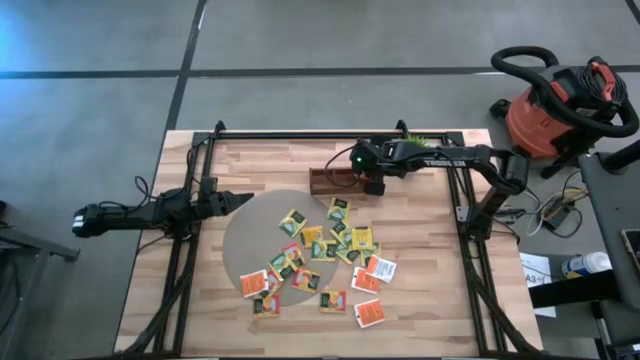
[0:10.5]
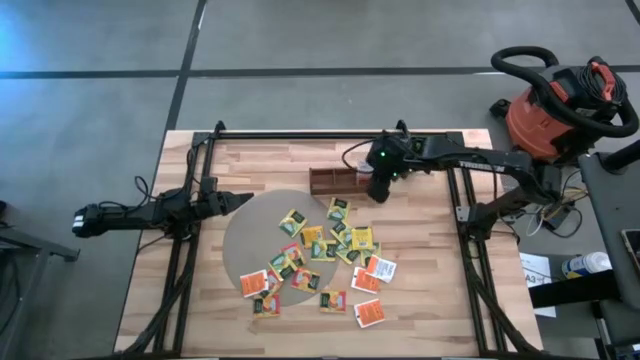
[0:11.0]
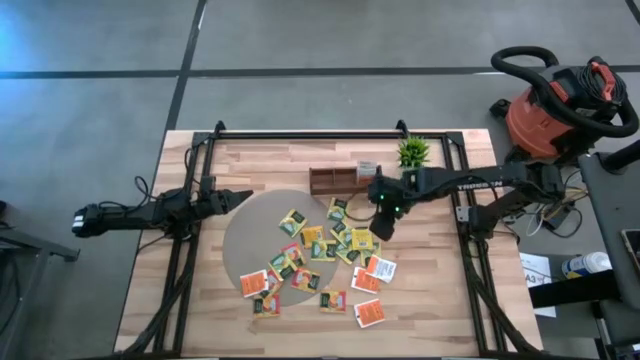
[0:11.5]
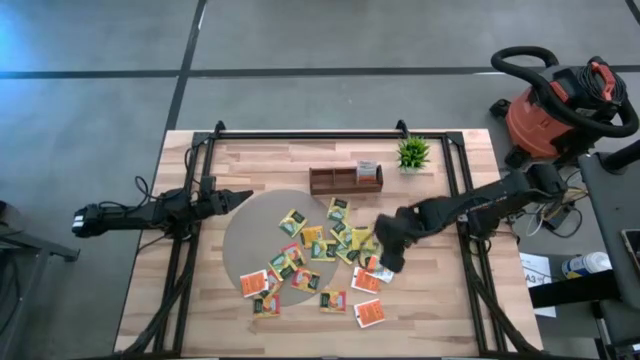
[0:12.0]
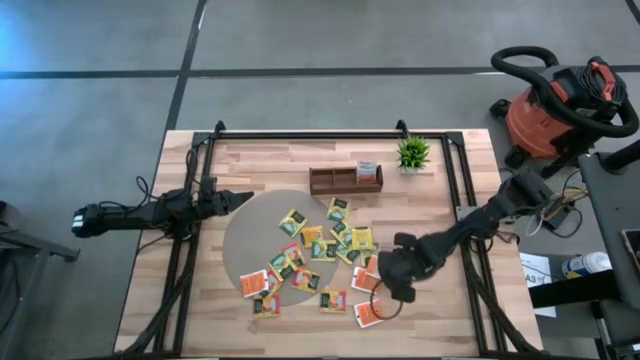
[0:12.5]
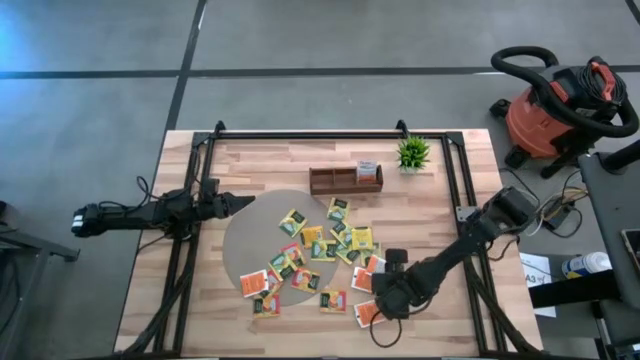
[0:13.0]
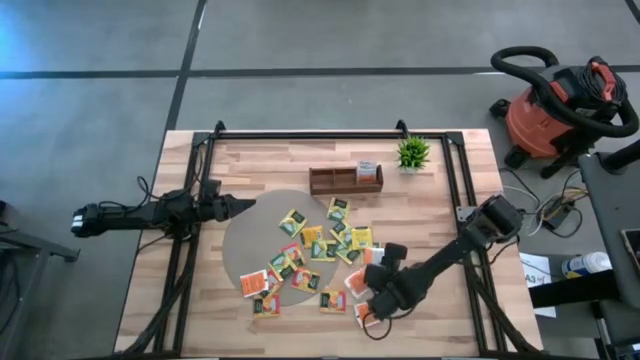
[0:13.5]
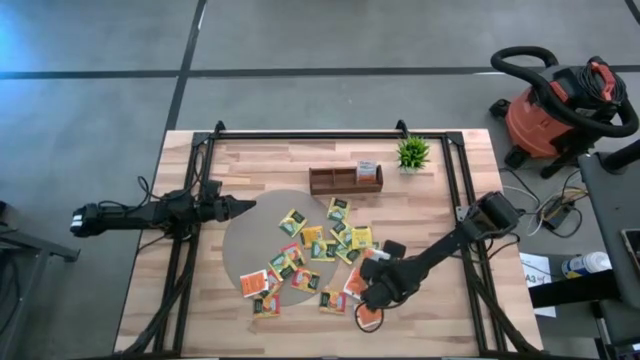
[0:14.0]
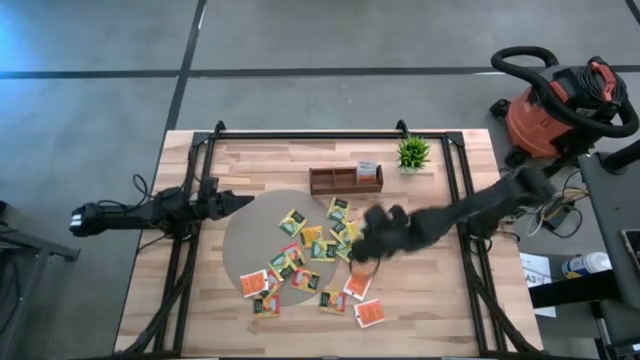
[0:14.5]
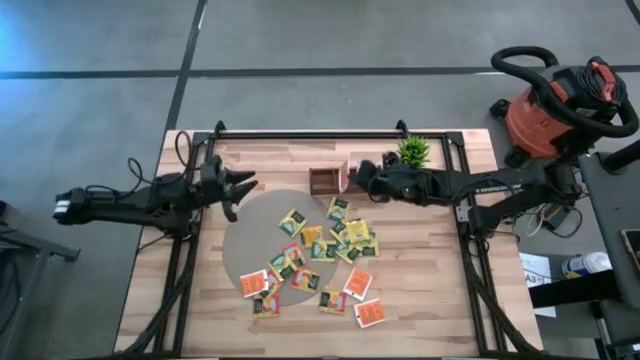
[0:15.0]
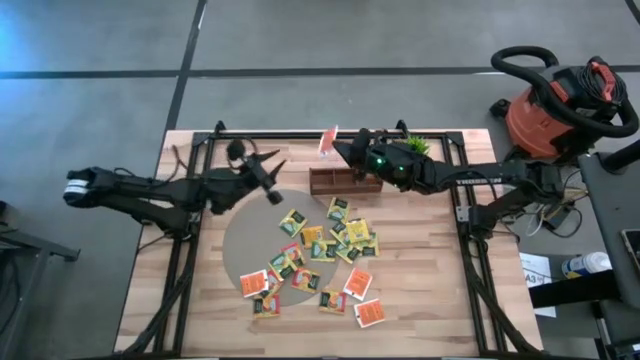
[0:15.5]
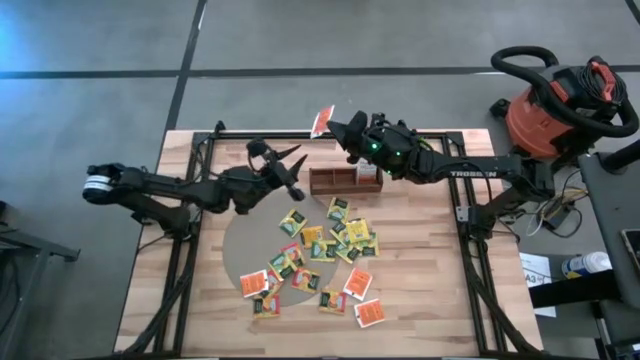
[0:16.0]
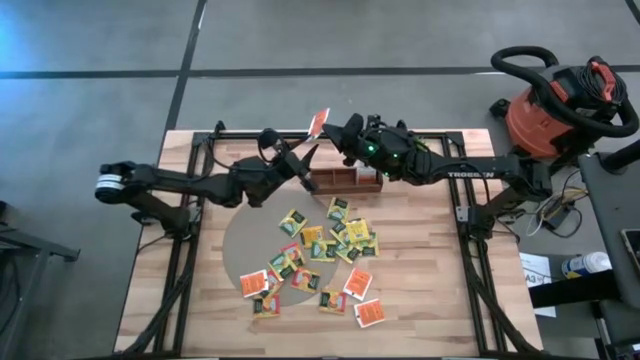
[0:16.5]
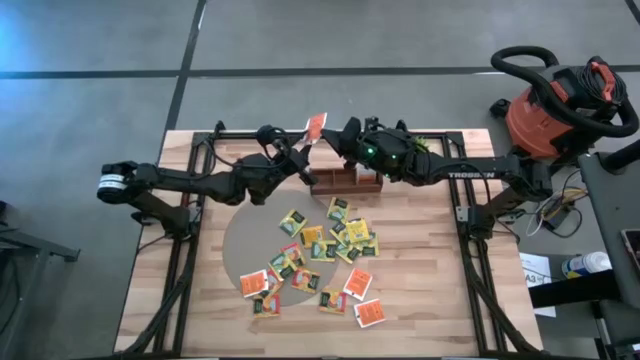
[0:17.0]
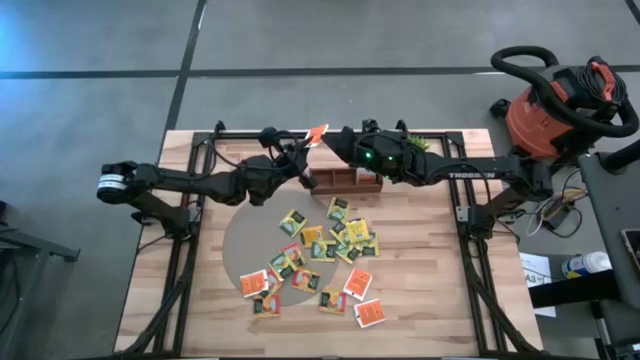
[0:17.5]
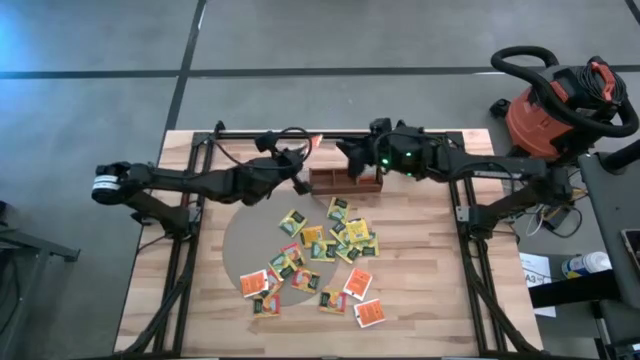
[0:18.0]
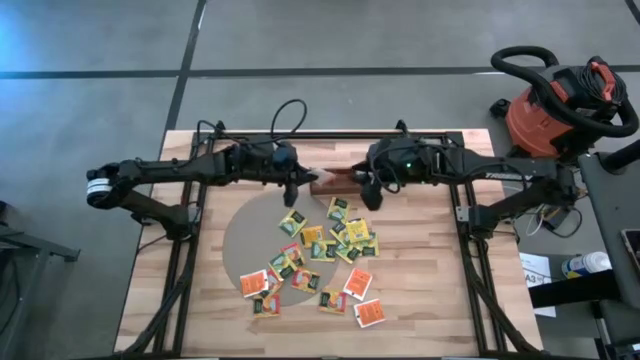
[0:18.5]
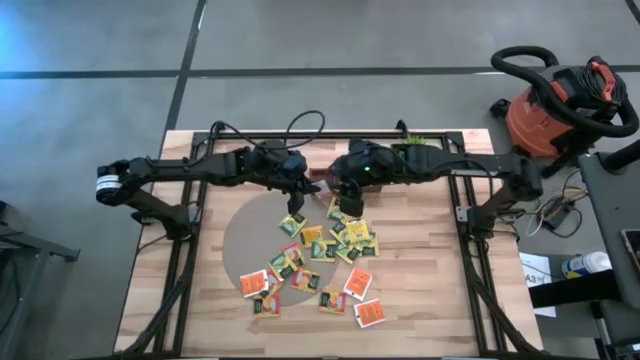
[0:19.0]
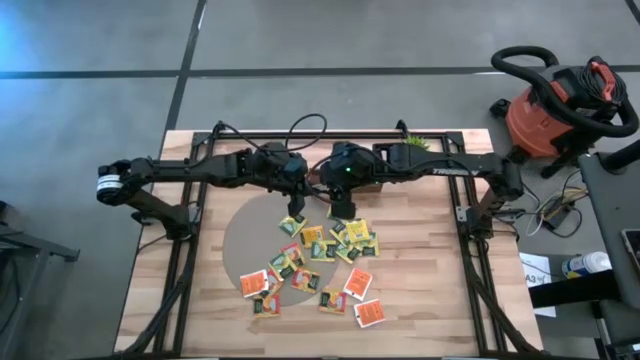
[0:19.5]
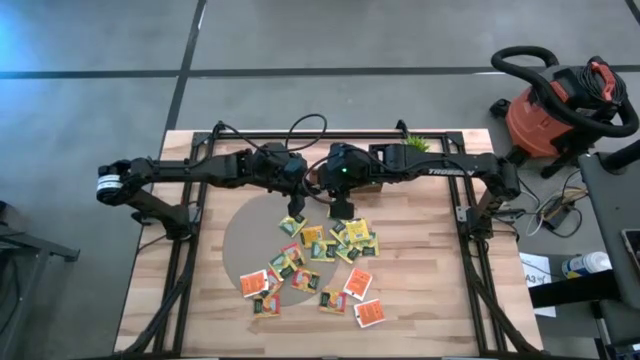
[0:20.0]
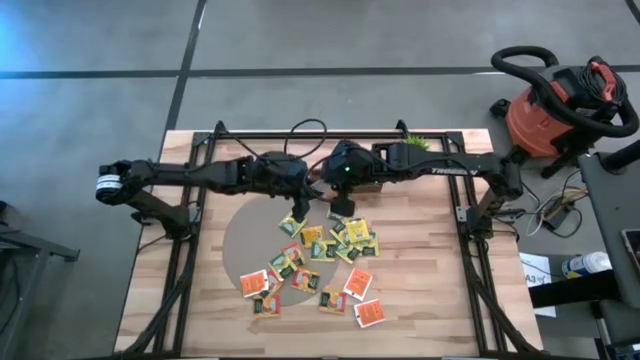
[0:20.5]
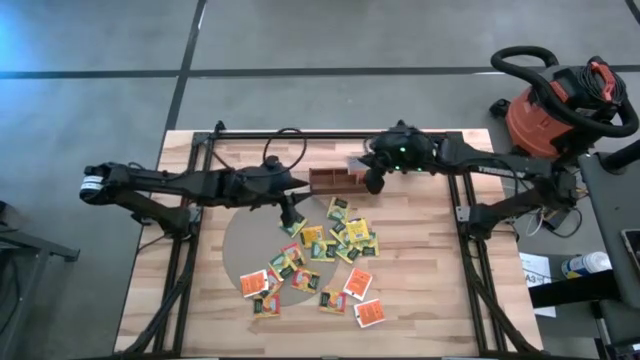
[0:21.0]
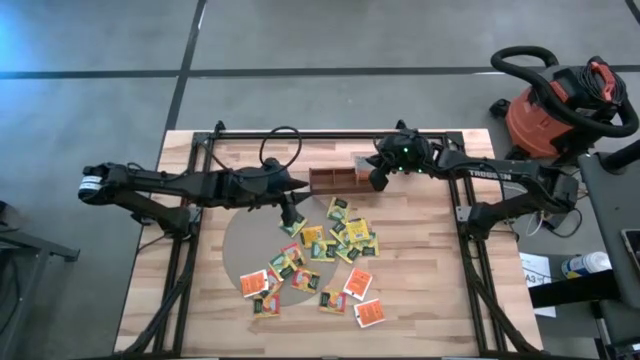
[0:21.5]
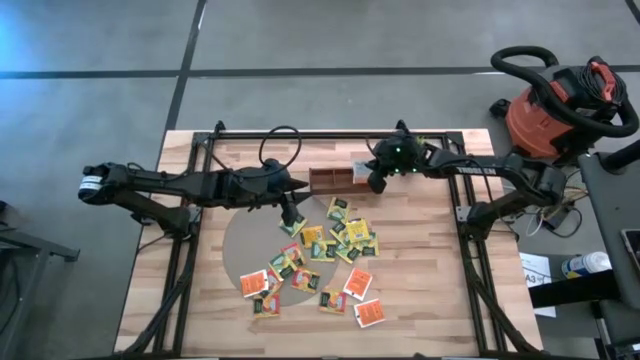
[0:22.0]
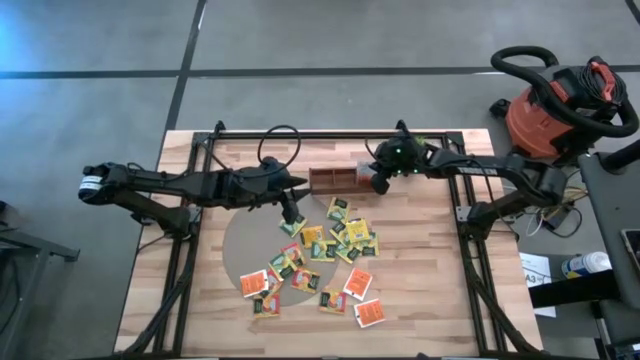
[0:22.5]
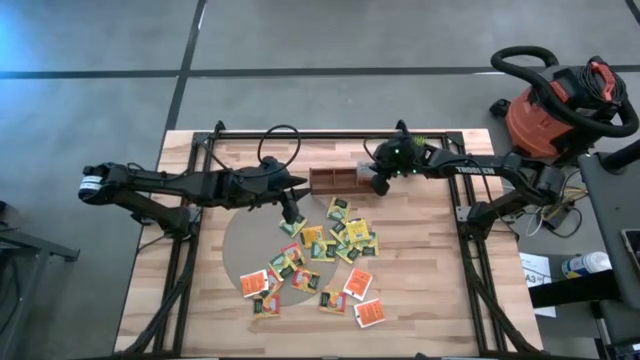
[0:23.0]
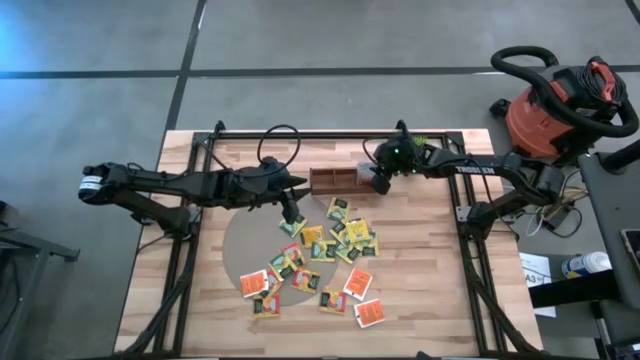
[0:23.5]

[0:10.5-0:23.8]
Task: Pick & Place Tea
Put the orange tea sachet into the right compartment of the wooden organizer

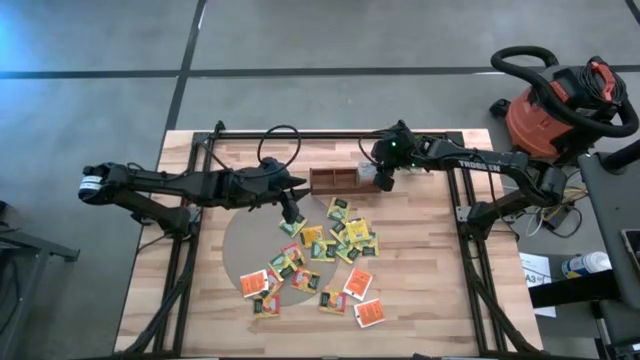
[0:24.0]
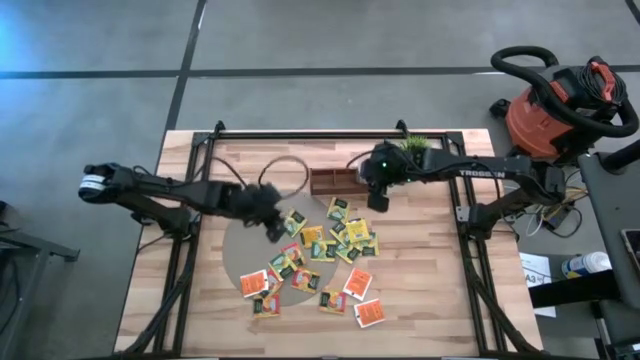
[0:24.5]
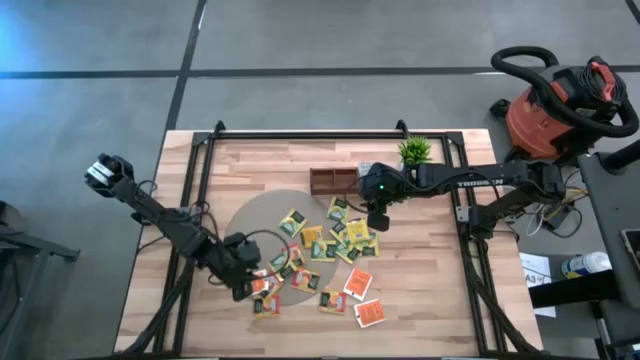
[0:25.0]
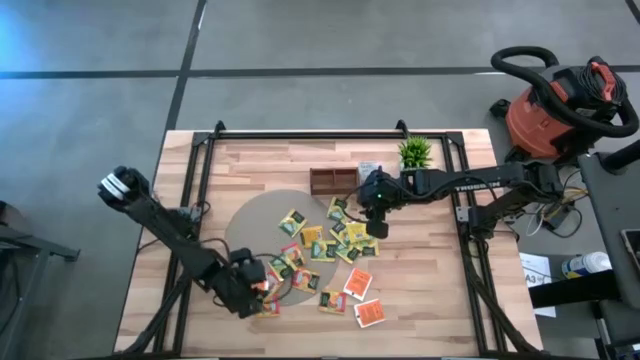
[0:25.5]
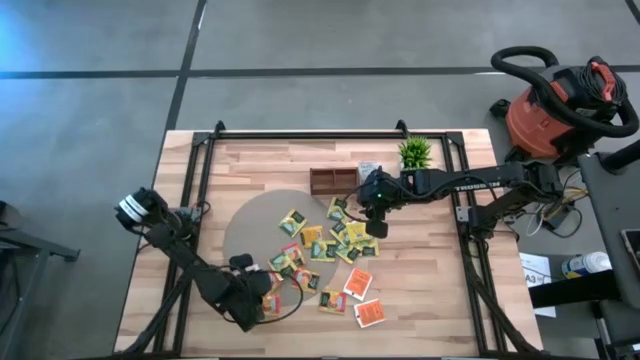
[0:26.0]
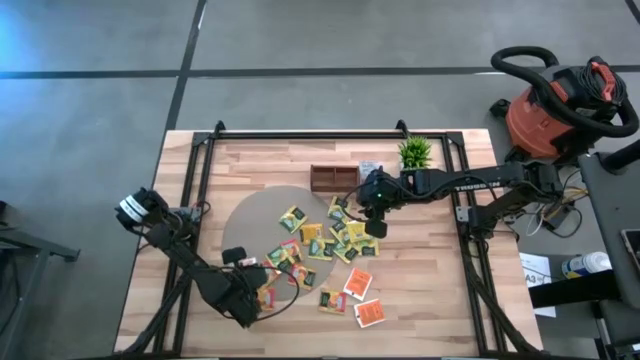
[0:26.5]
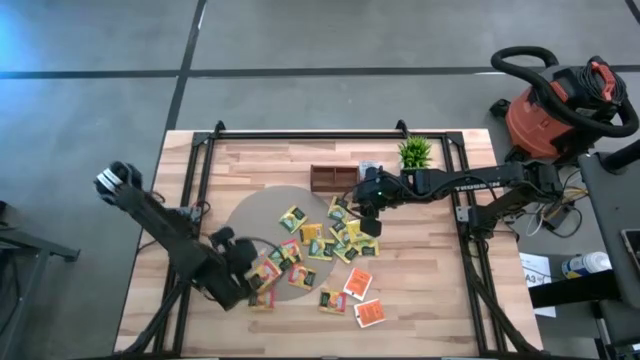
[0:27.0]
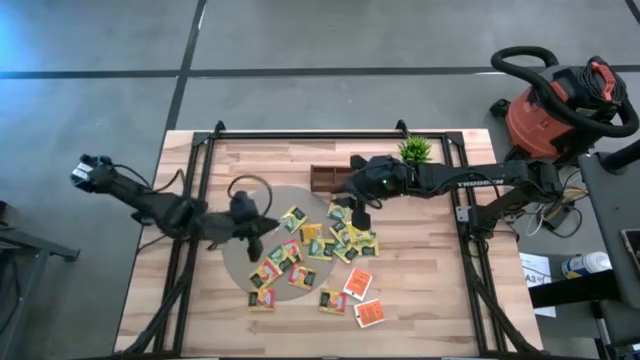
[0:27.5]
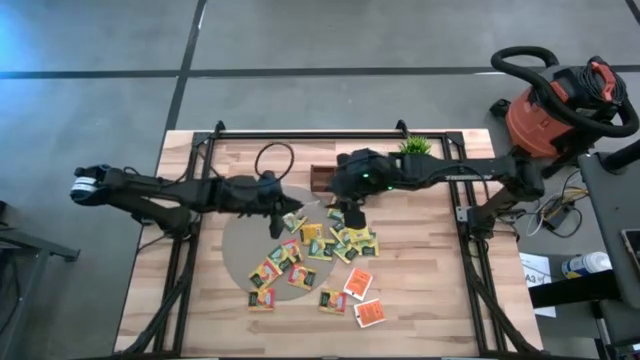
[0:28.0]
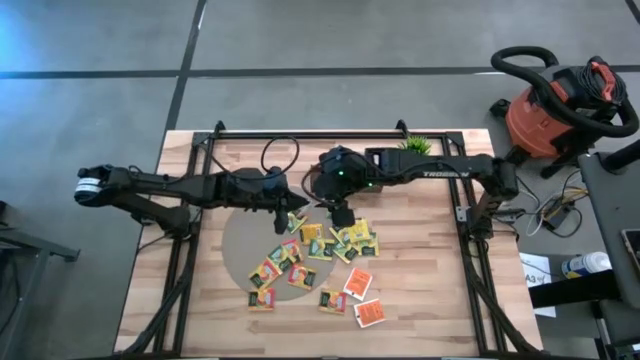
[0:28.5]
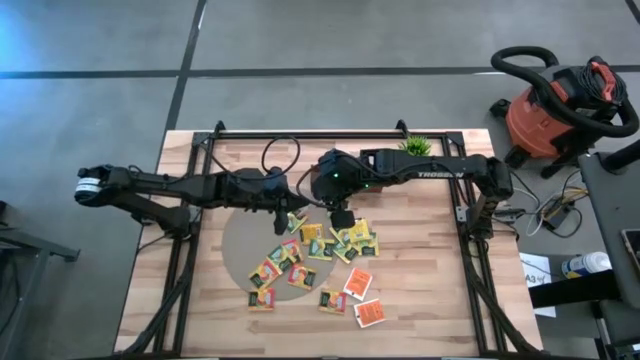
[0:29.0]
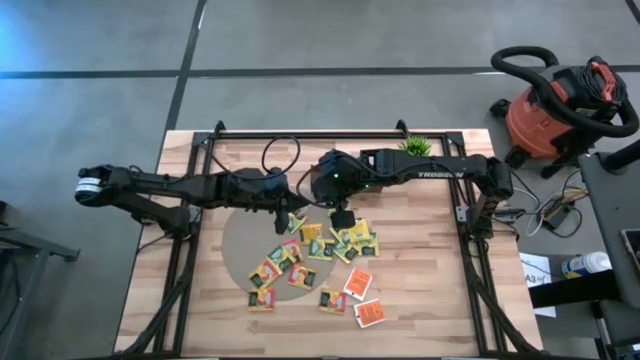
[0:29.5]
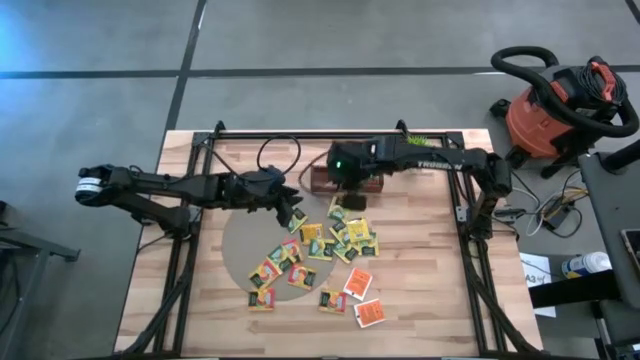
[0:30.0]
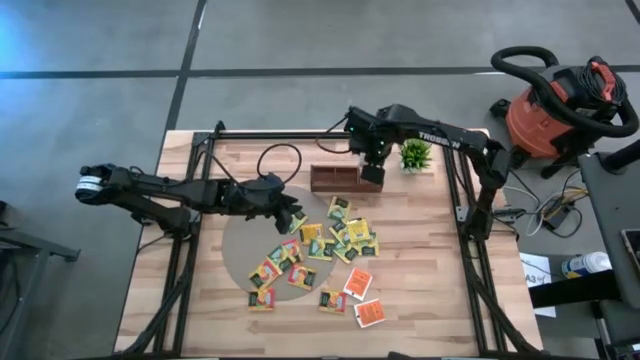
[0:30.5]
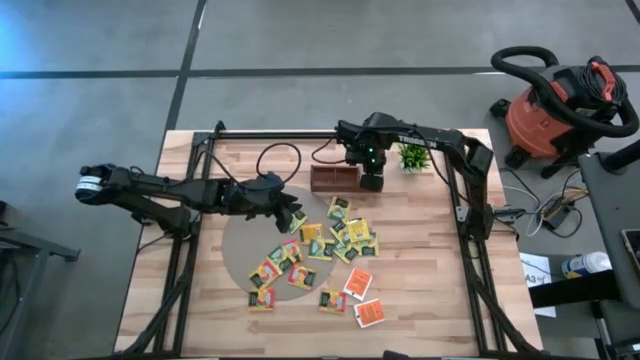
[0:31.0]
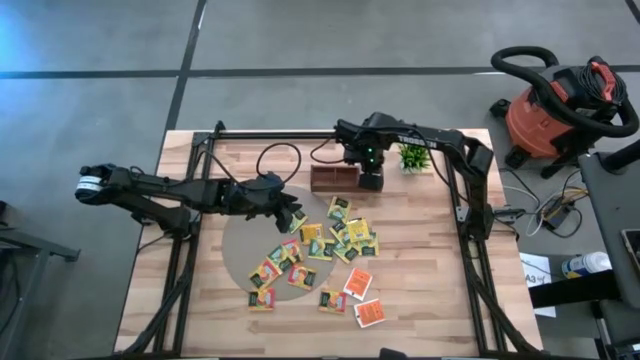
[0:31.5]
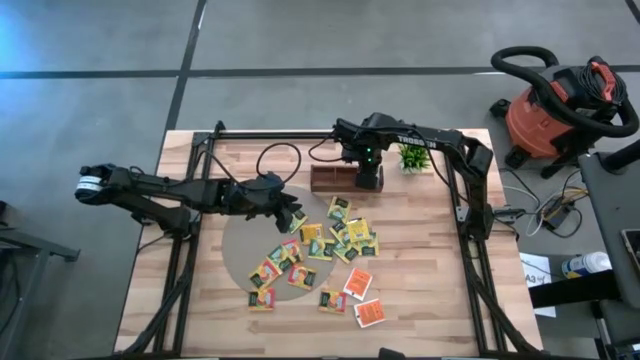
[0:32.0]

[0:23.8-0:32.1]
Put the orange tea sachet into the right compartment of the wooden organizer
